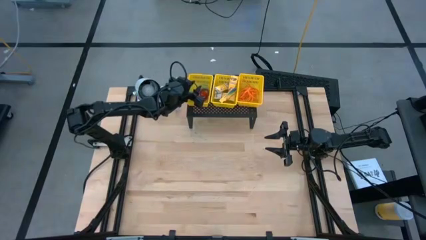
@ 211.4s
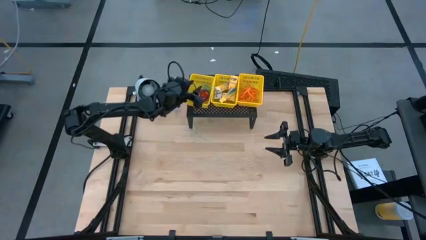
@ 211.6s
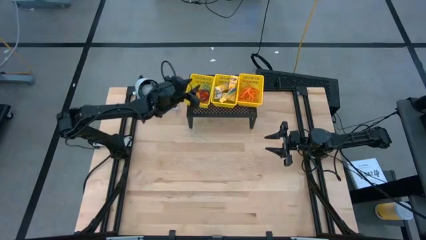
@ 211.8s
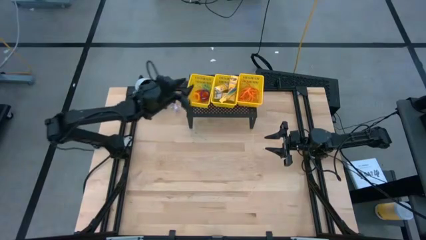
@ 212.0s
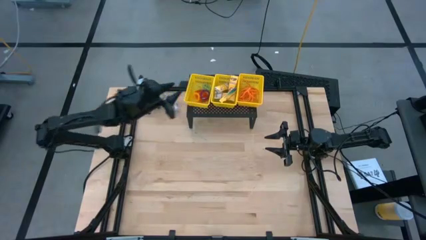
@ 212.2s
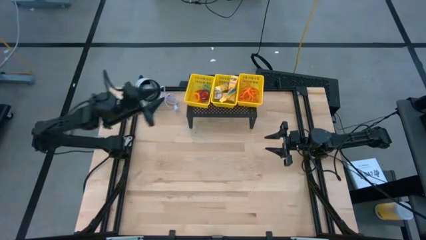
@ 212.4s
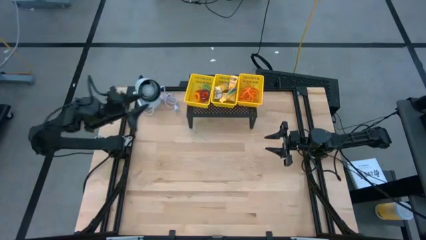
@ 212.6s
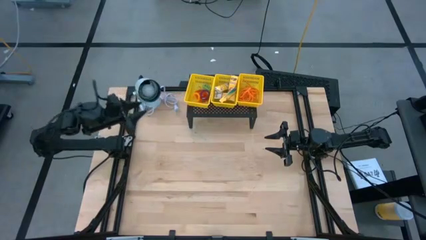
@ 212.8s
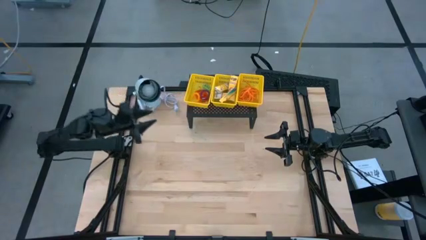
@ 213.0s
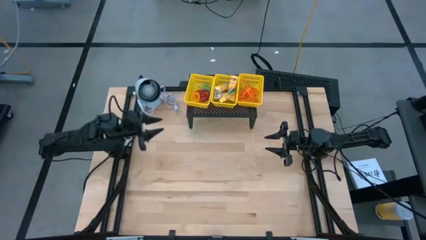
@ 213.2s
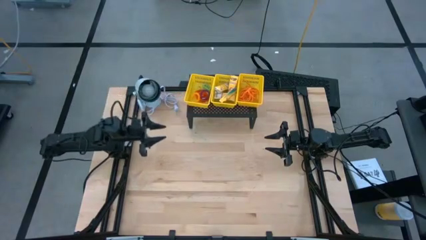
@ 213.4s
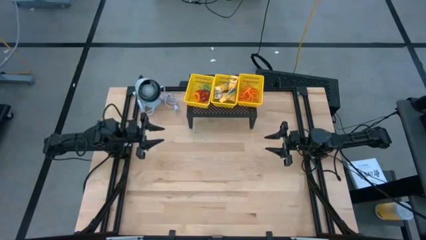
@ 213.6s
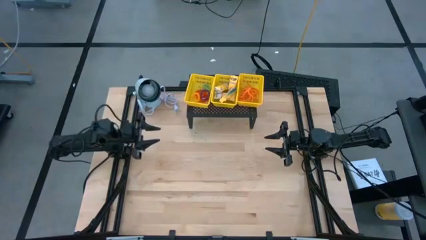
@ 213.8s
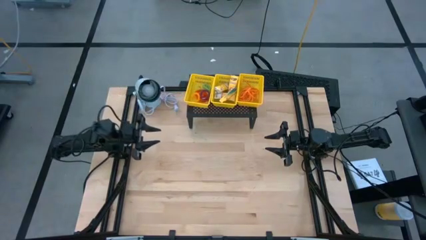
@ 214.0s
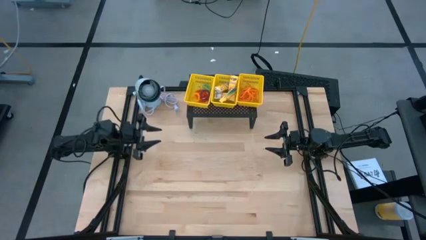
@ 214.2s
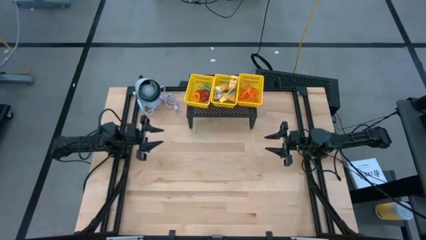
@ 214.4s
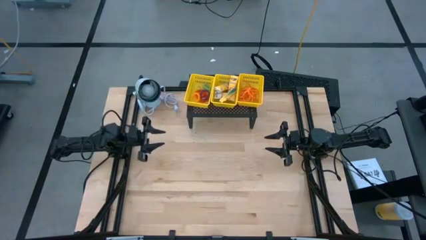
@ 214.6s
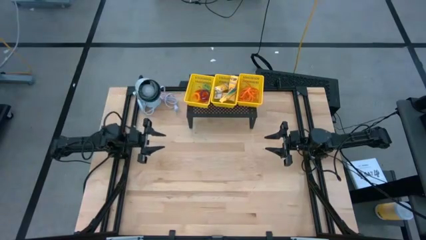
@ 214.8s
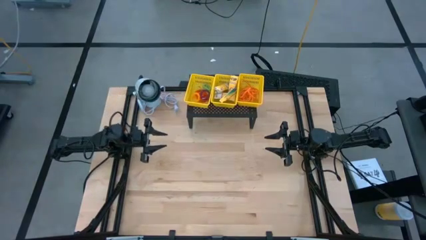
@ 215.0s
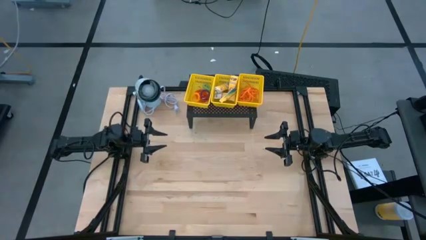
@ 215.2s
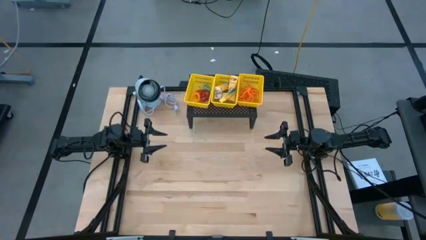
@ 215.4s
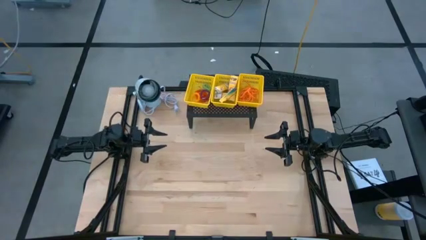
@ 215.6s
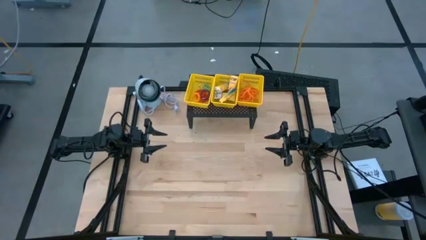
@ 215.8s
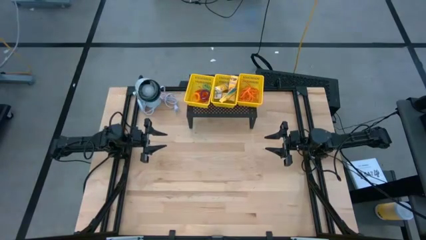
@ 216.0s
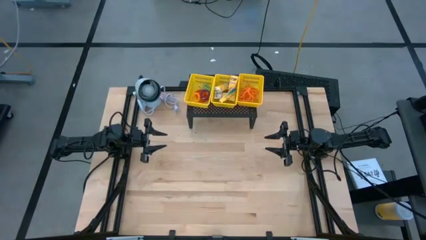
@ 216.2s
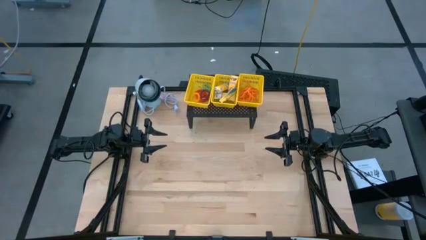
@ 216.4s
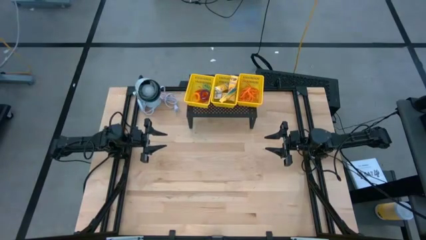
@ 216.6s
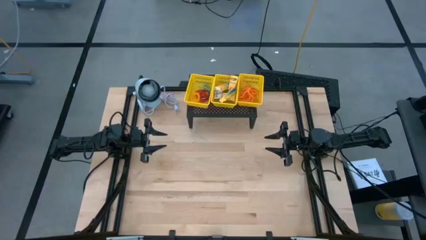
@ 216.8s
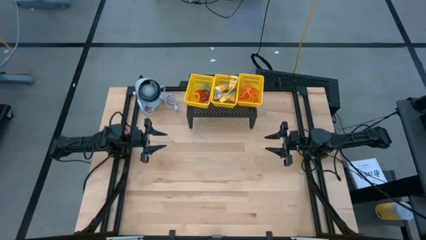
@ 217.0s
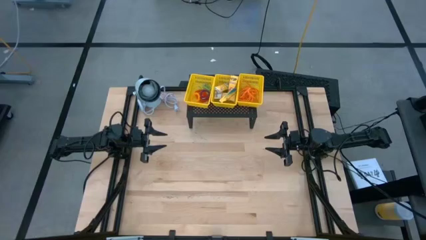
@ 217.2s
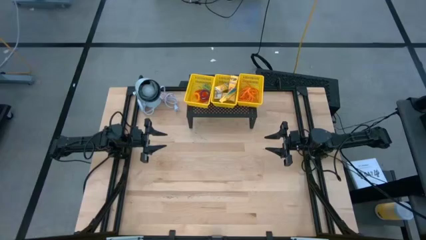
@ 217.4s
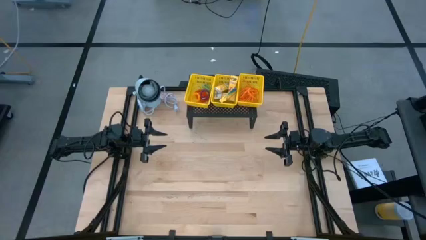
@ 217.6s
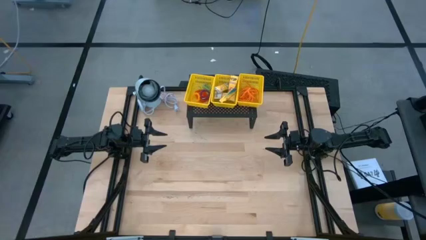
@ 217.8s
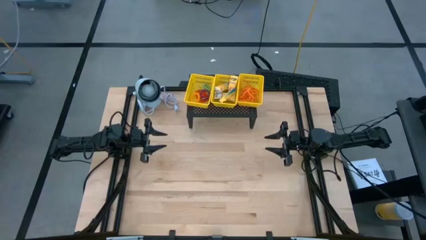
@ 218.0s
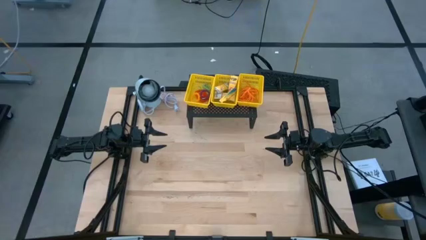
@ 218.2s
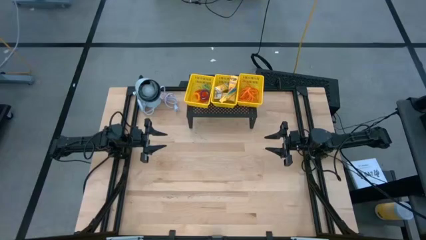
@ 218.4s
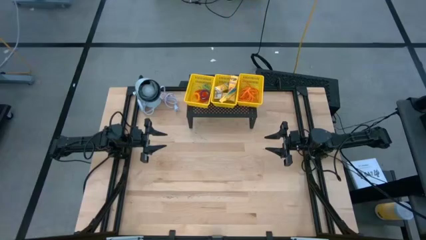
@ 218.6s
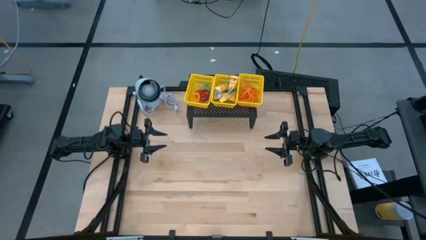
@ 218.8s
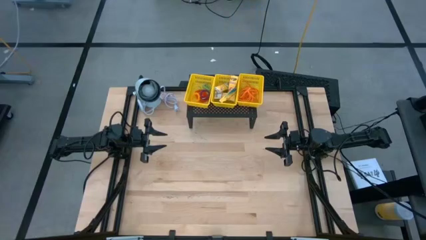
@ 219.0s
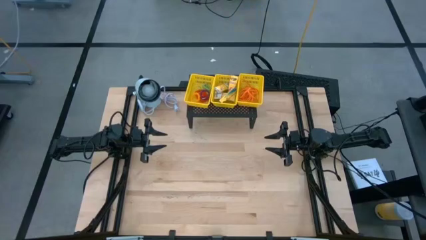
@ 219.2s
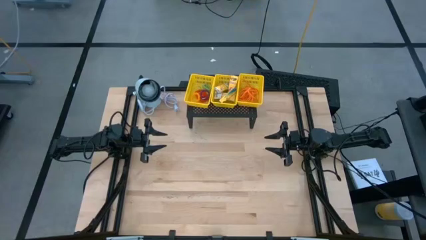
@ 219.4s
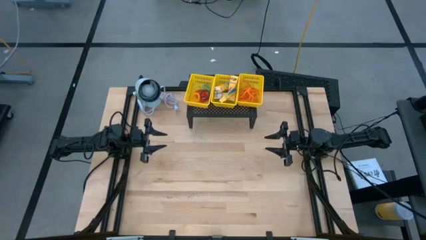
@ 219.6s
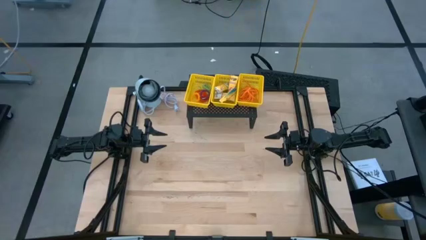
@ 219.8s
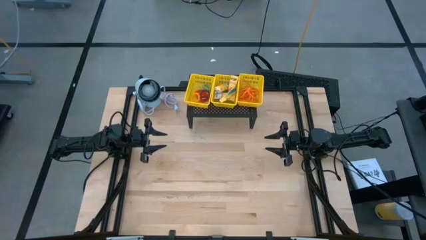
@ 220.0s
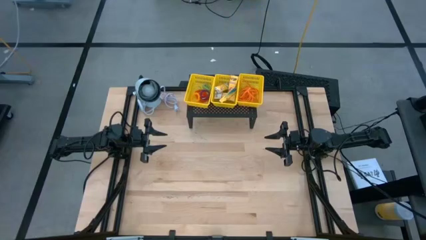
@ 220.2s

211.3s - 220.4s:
Task: Pick & Place Office Desk Supplies
Return to Home Position

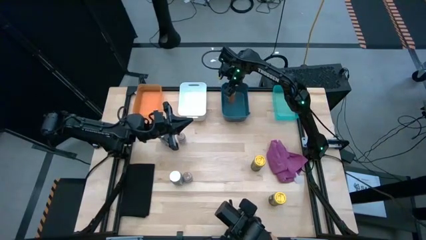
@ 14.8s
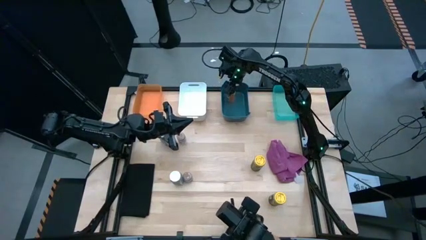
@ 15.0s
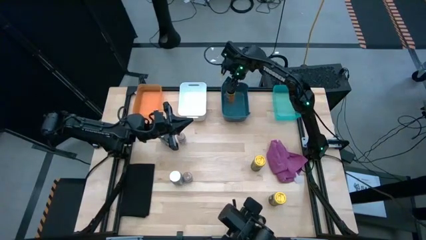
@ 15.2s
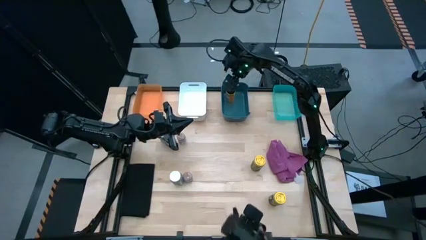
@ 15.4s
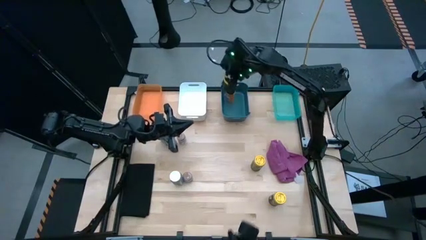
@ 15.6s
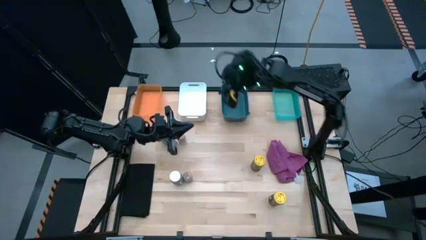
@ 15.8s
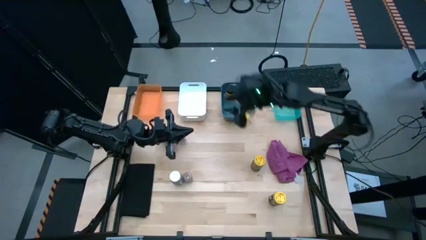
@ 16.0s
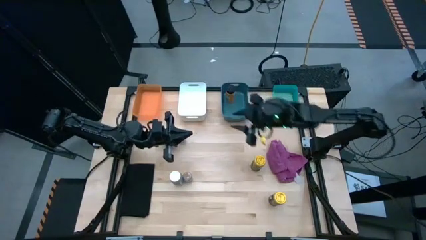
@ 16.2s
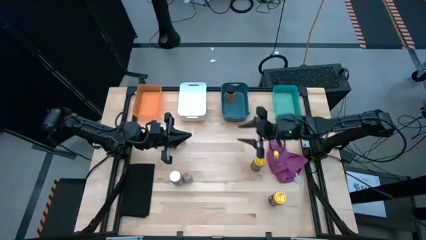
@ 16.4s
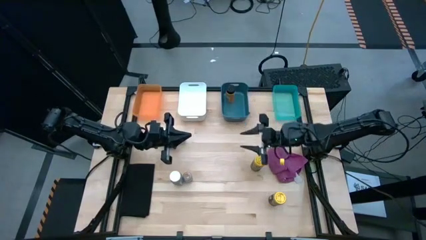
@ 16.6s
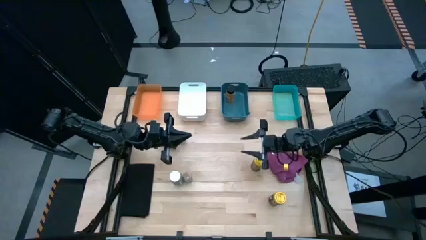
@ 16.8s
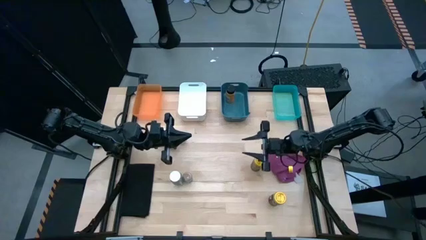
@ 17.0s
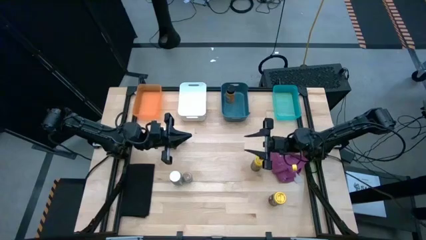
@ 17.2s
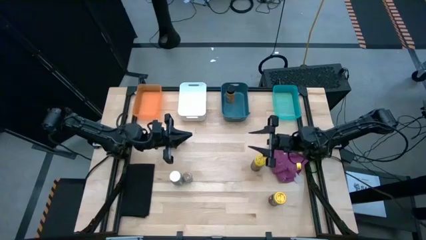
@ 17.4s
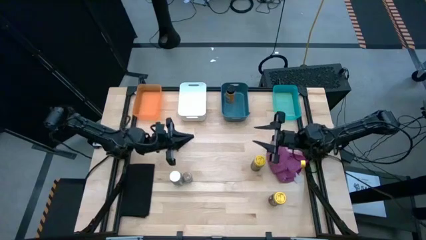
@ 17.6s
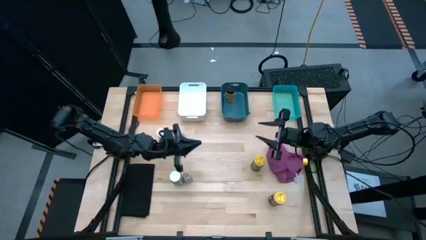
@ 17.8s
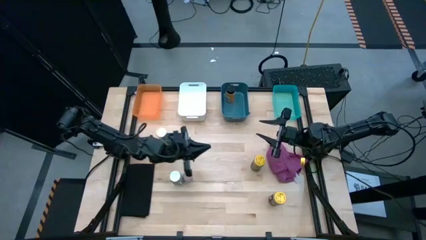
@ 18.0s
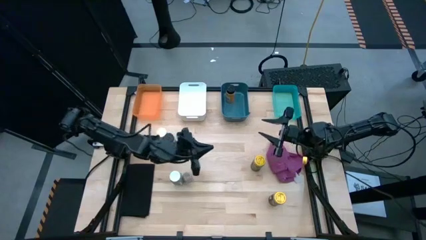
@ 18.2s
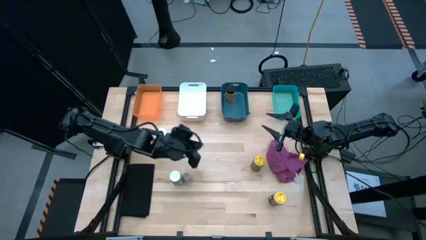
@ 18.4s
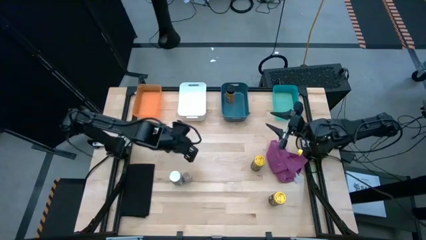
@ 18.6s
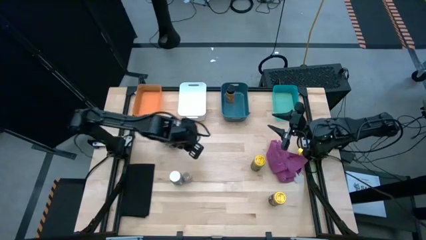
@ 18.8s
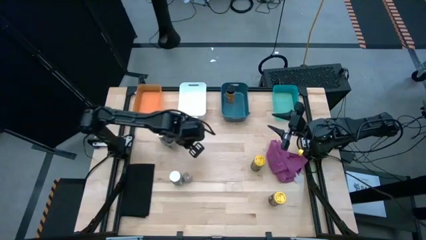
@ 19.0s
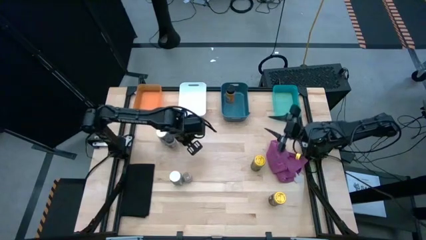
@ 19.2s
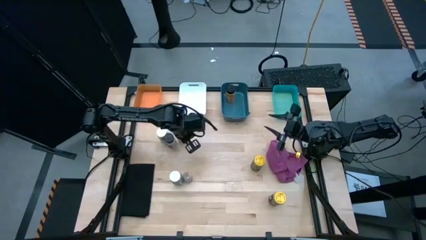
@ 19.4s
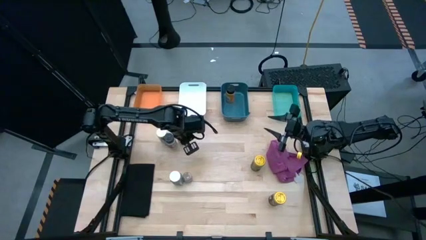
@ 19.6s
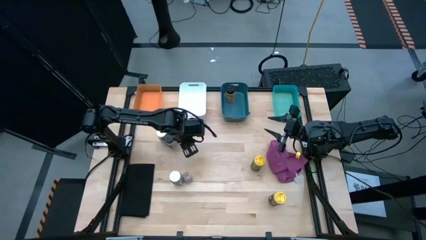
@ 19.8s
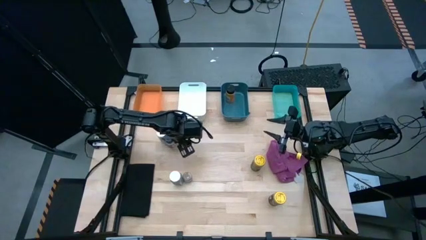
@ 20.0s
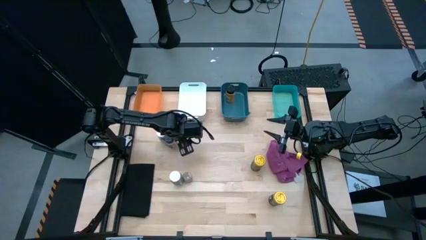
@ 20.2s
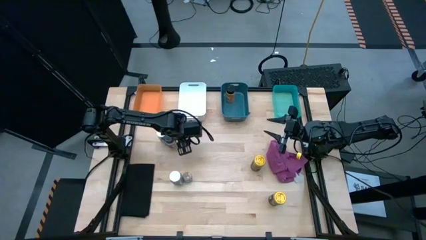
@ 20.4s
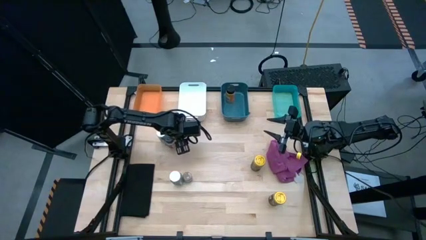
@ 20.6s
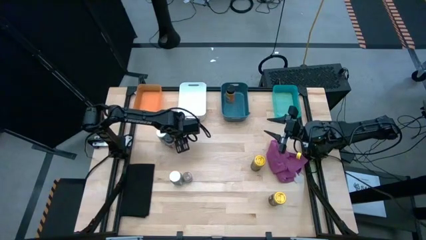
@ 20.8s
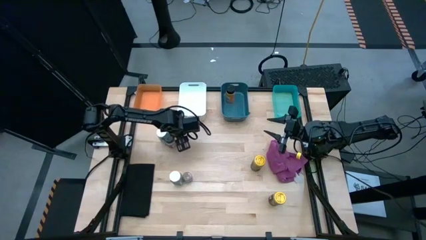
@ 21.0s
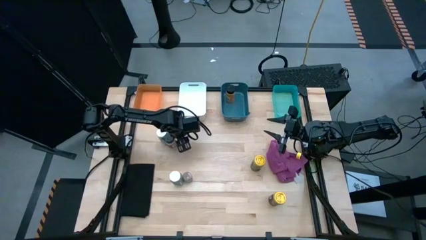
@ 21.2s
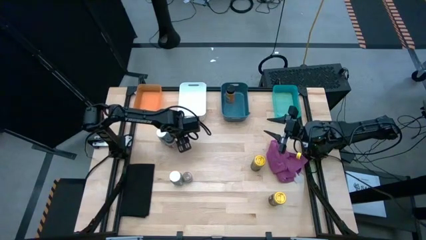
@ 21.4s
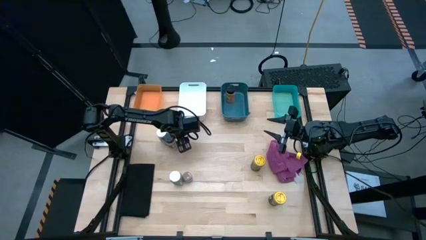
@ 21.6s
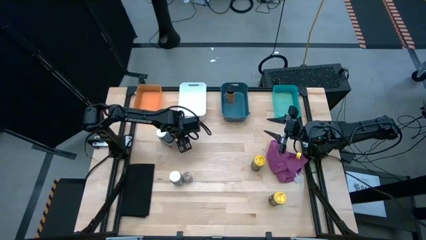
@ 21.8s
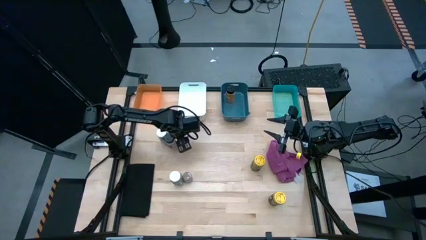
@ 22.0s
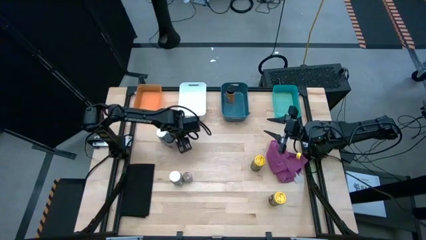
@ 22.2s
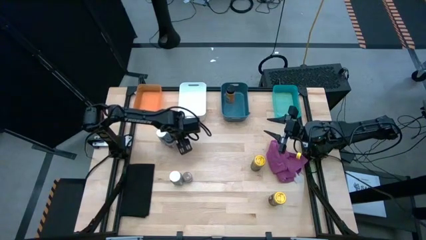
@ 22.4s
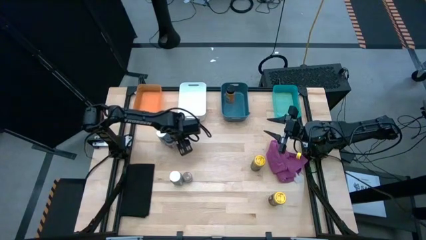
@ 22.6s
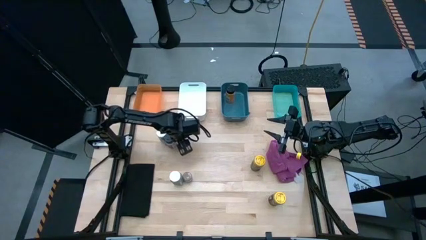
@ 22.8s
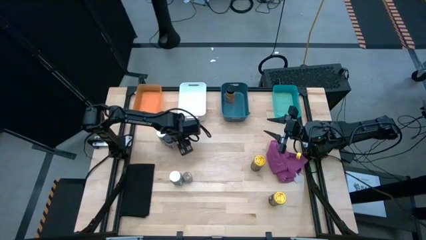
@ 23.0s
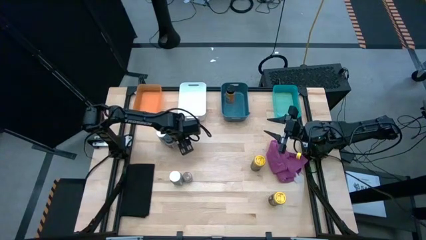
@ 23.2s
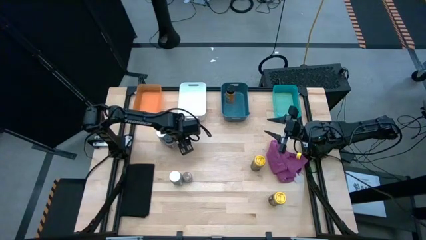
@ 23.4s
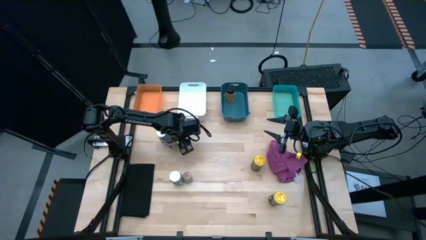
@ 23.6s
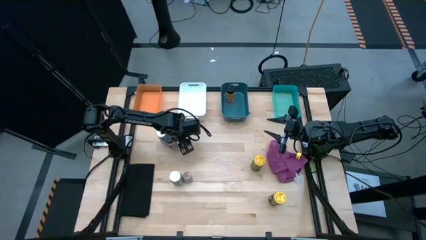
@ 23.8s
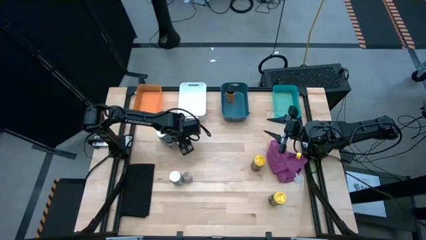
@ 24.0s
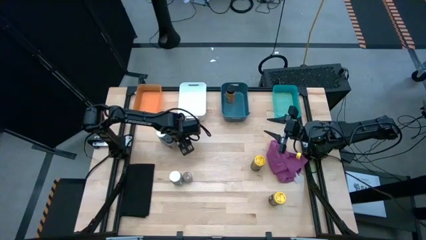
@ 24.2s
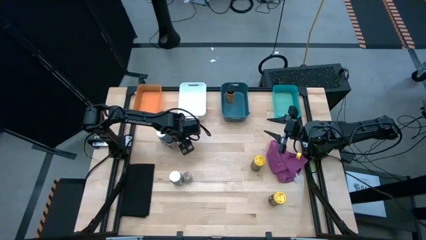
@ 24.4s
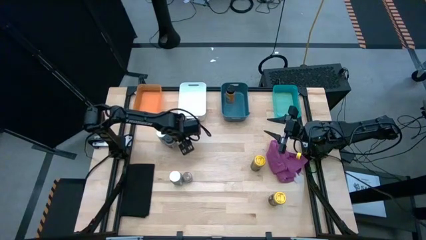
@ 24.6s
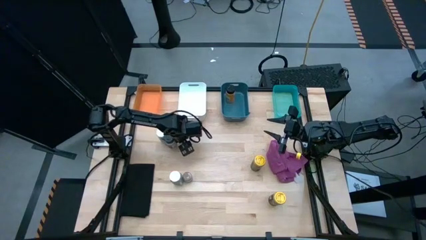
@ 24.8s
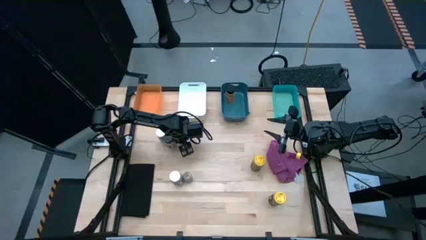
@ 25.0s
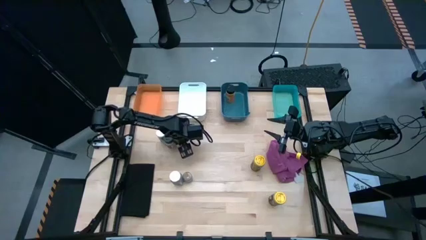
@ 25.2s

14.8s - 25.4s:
Task: Sort spices by type
Put the top brown seasoning bottle into the orange bin
